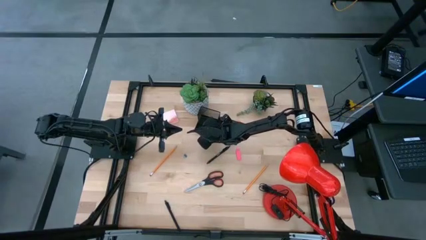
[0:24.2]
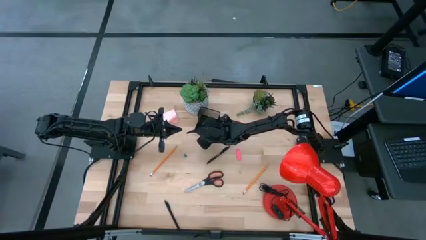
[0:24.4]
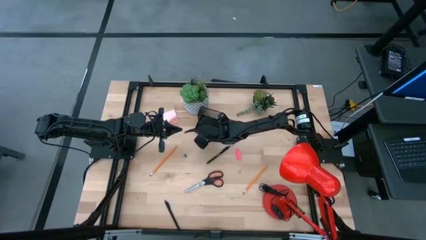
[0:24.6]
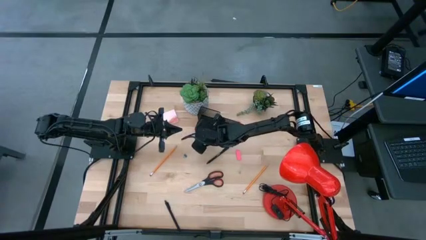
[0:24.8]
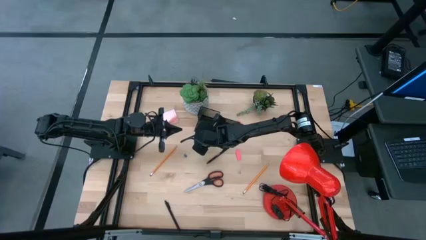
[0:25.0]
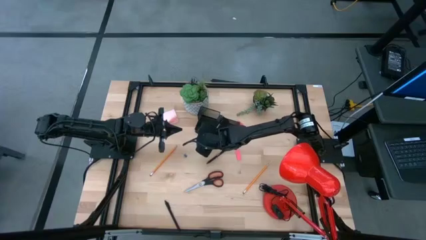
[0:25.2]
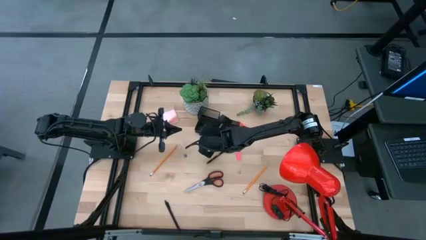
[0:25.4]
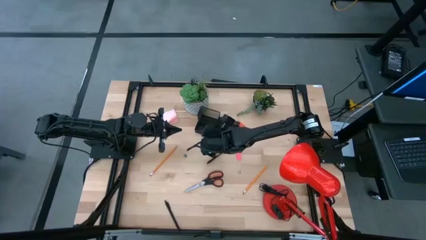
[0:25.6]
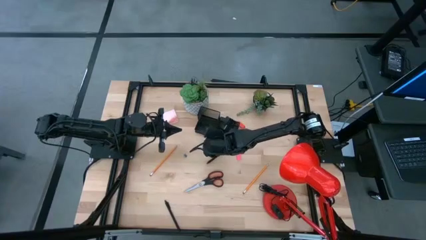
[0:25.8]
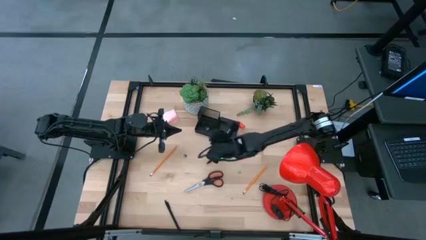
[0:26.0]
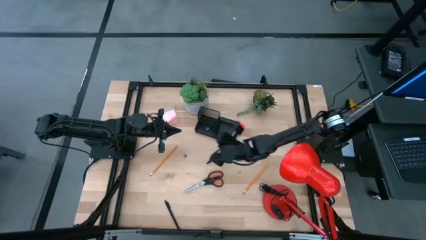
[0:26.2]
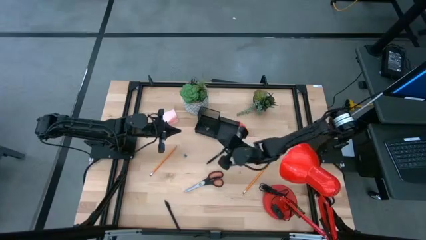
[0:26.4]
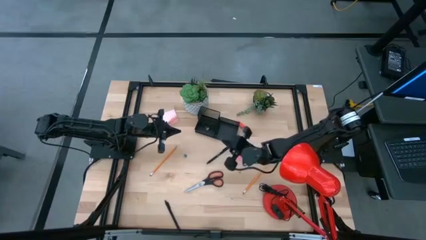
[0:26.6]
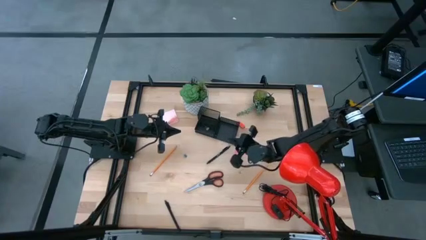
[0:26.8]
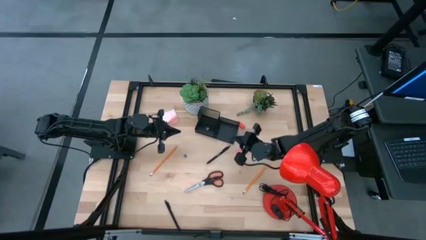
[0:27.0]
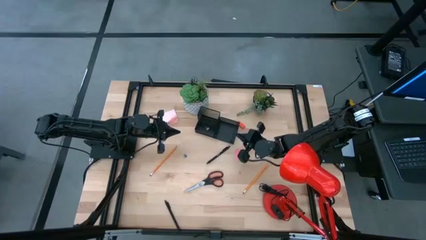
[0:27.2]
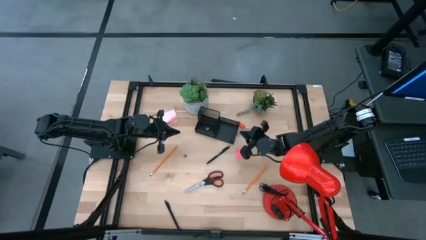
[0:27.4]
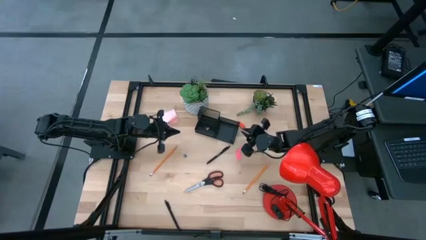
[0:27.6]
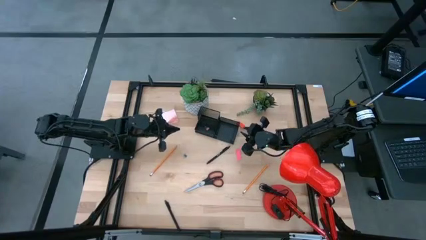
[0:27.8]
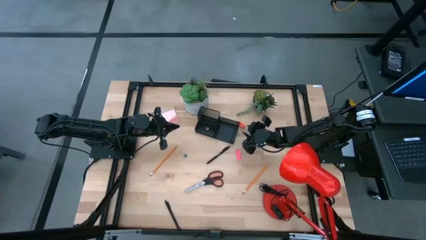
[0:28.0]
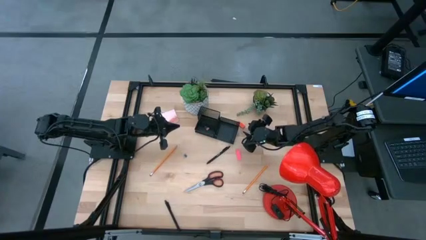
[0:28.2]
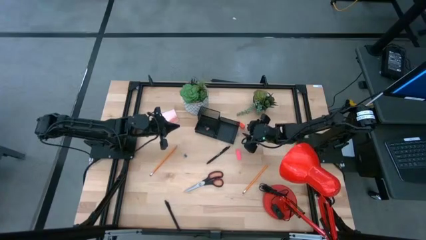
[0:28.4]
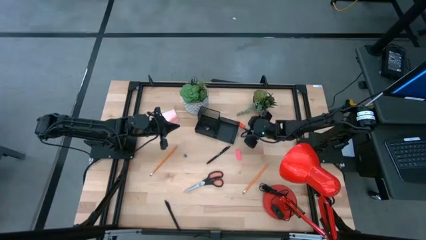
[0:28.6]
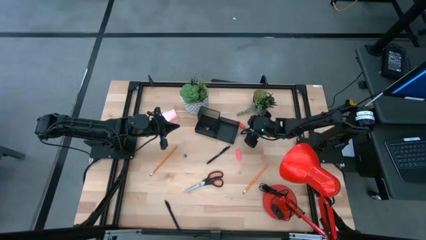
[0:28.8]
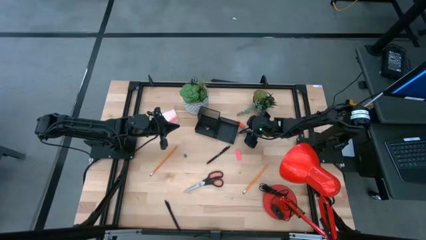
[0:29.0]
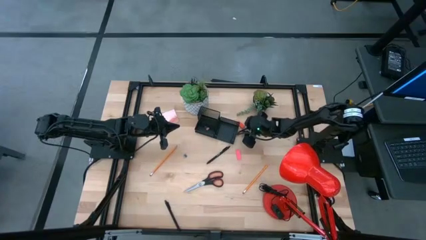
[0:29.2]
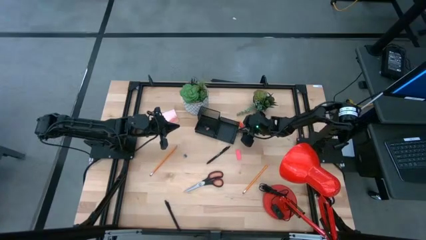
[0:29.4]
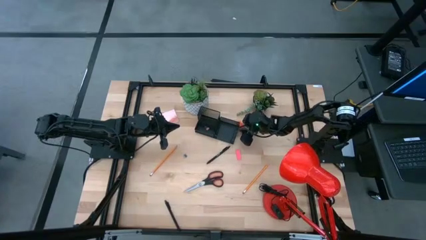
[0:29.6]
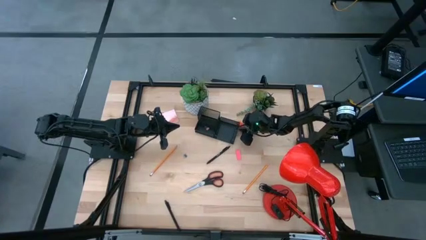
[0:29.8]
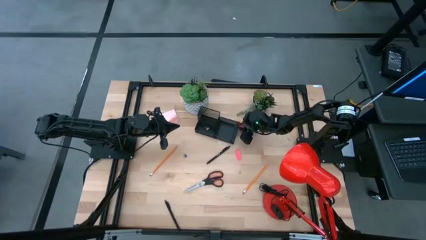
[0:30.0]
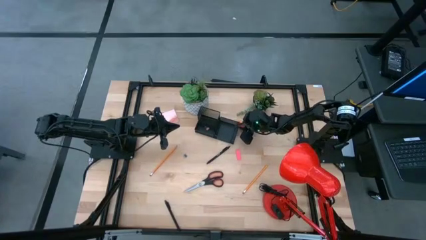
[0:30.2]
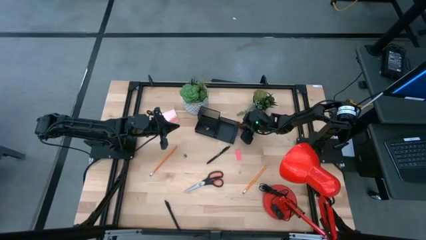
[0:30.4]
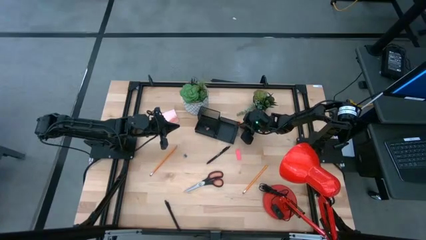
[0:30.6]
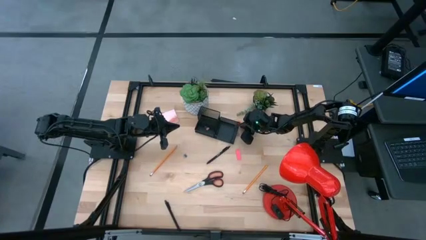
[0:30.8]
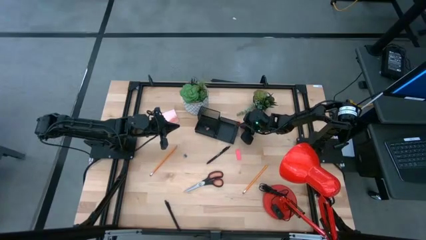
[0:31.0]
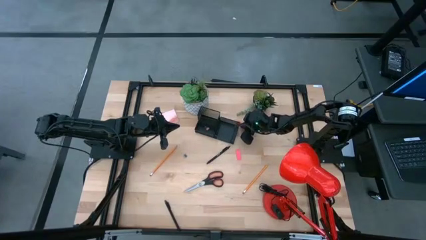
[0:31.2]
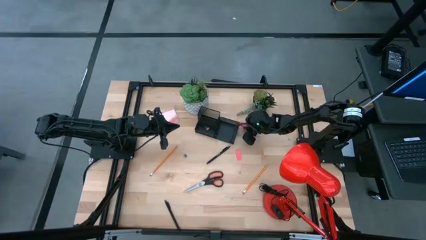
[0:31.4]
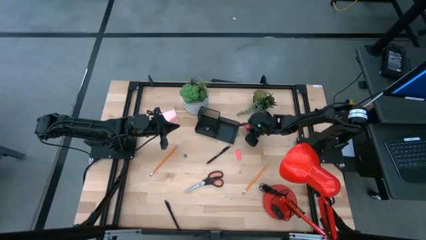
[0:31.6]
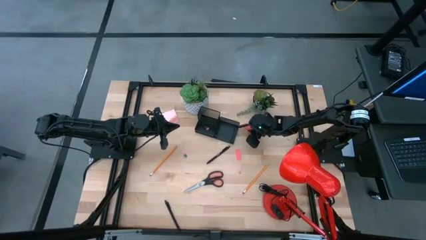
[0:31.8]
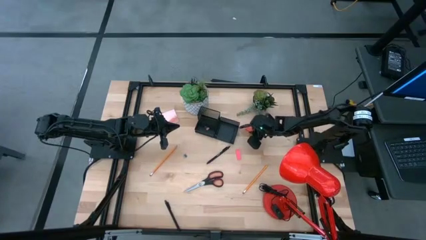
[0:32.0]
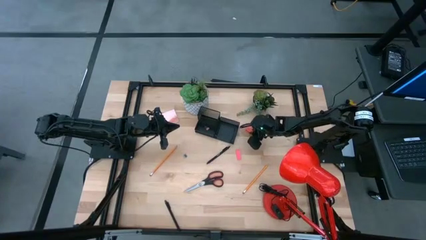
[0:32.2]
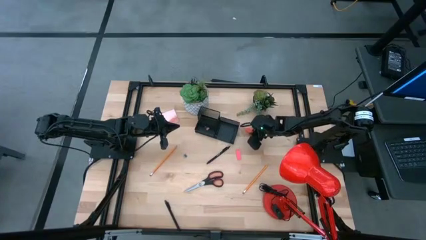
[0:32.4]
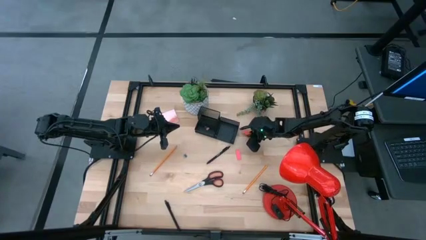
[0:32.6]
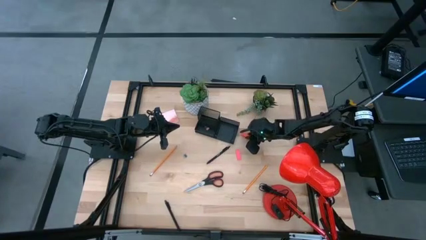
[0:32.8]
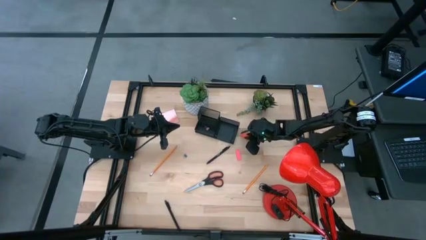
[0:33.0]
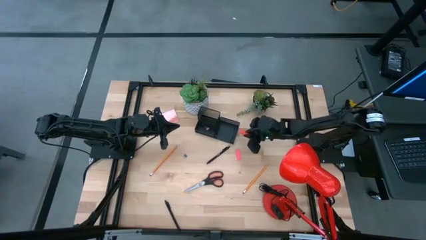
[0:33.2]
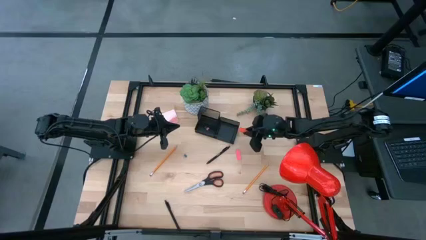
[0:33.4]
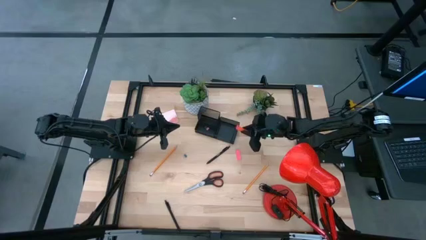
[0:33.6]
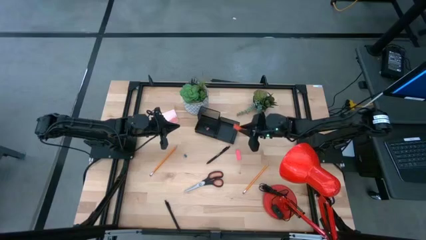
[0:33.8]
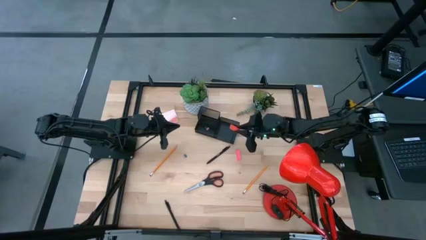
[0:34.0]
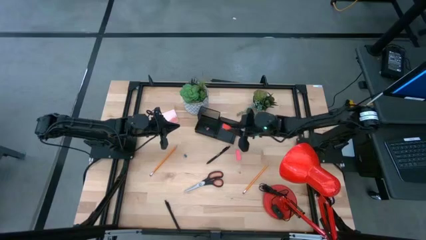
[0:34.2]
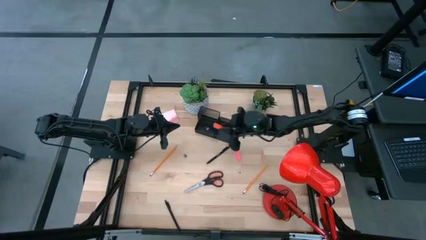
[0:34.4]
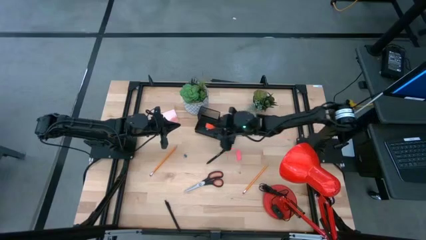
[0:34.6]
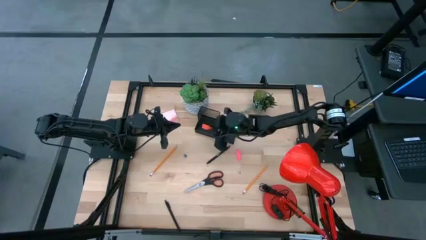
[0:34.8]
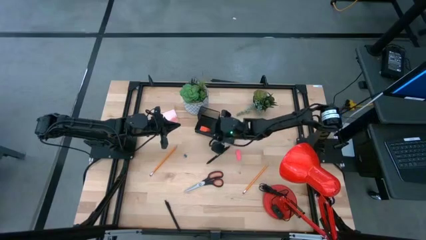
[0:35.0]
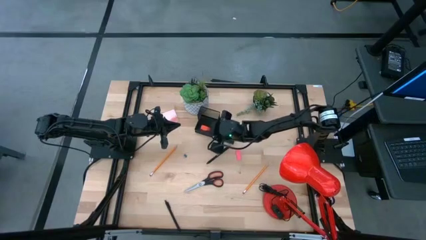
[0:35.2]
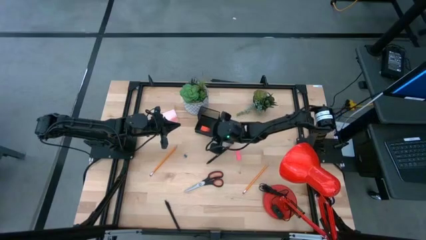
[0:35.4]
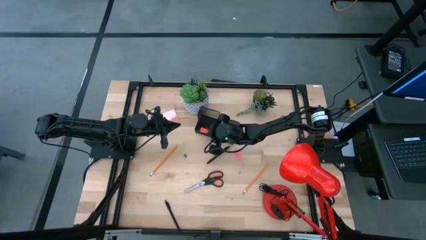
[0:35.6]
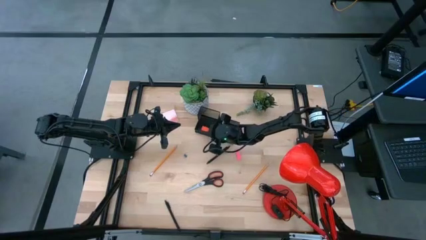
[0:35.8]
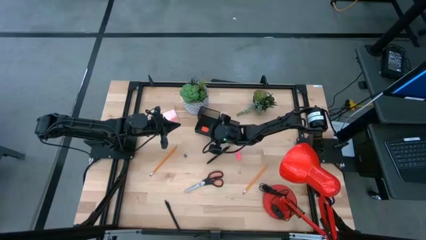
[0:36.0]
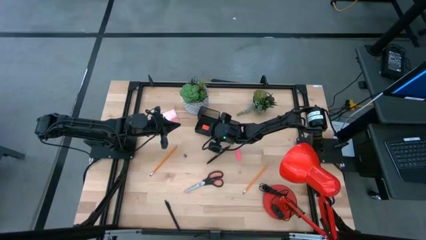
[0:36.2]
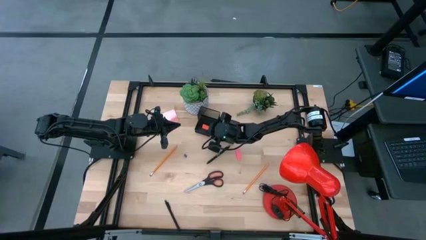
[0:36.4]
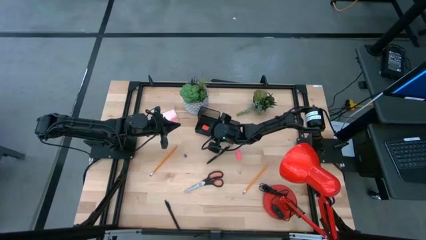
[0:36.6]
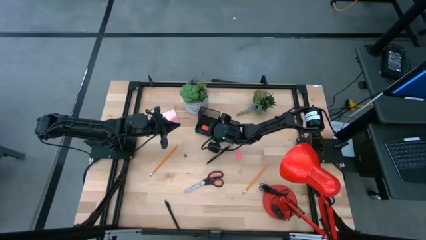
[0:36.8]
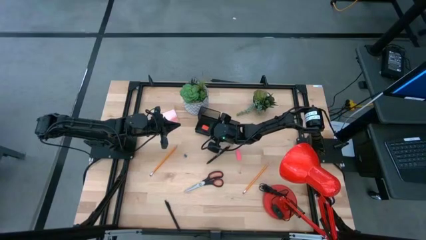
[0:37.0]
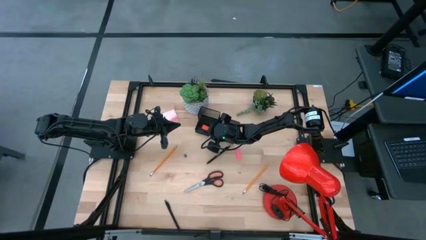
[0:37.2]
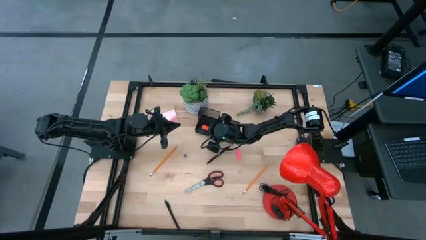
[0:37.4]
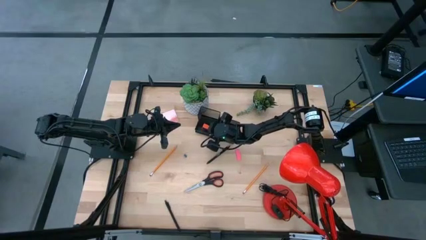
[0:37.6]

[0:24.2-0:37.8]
Task: Pick and place office supplies into organizer
Put the orange eraser into the black desk organizer
